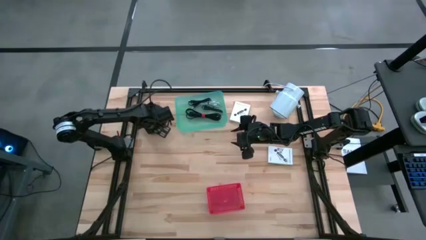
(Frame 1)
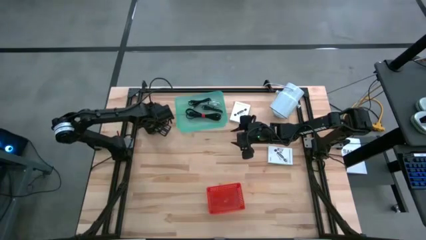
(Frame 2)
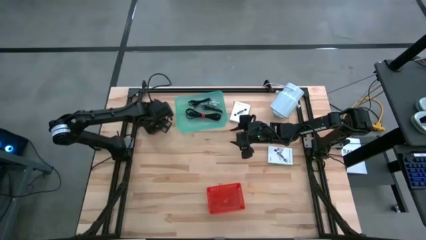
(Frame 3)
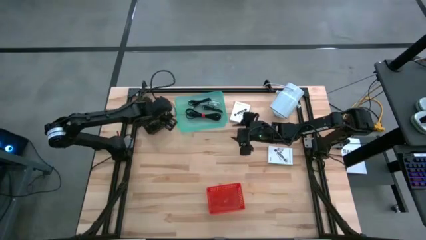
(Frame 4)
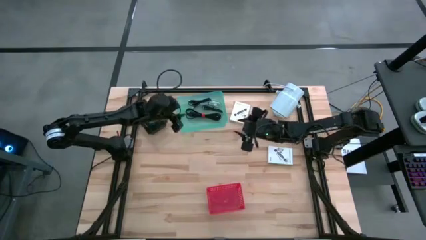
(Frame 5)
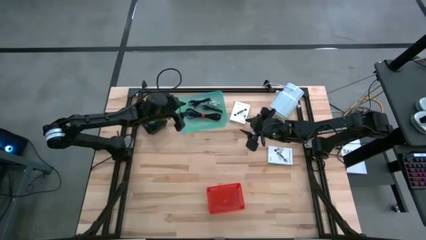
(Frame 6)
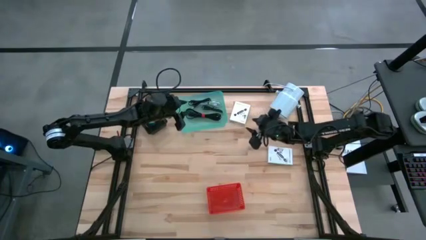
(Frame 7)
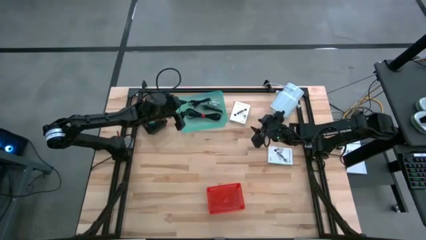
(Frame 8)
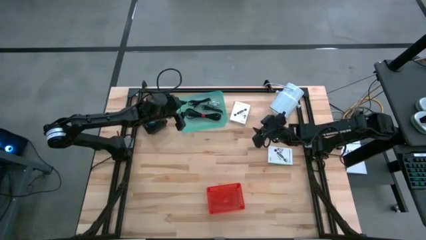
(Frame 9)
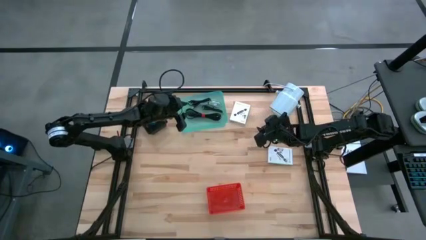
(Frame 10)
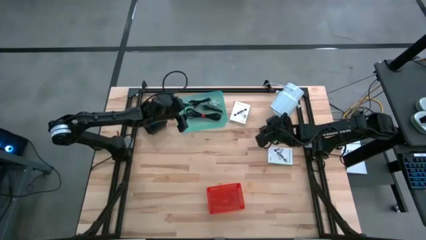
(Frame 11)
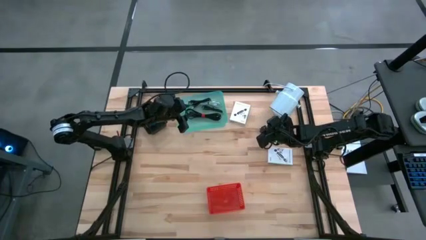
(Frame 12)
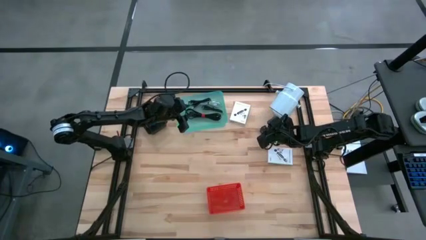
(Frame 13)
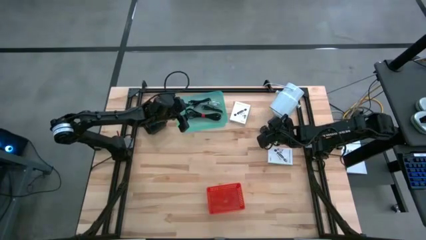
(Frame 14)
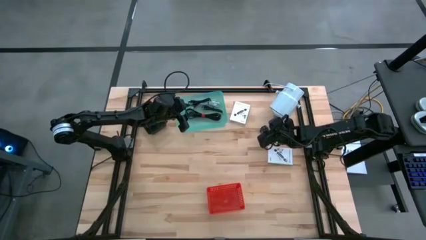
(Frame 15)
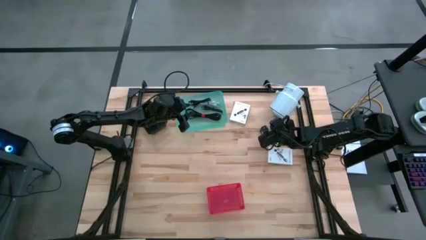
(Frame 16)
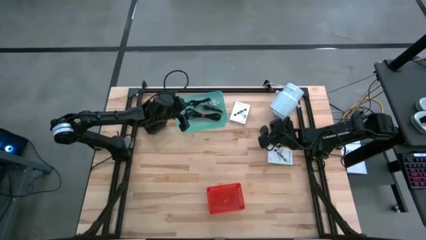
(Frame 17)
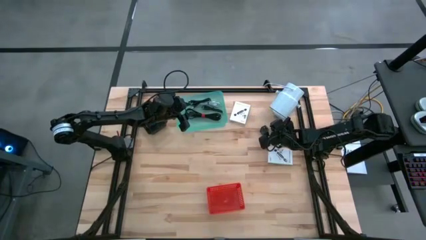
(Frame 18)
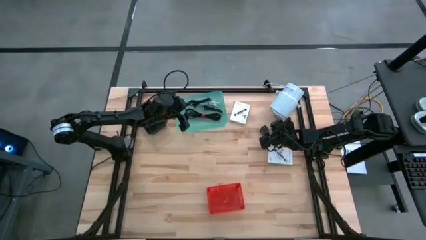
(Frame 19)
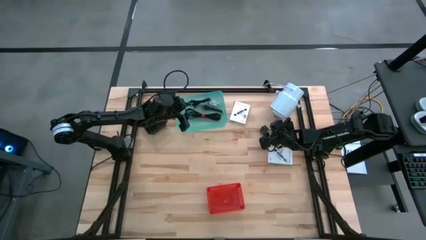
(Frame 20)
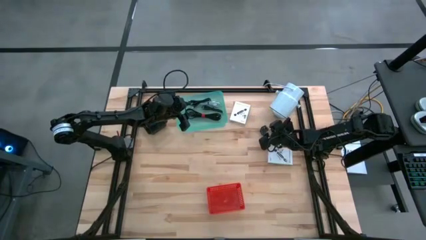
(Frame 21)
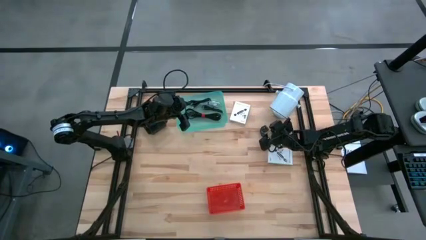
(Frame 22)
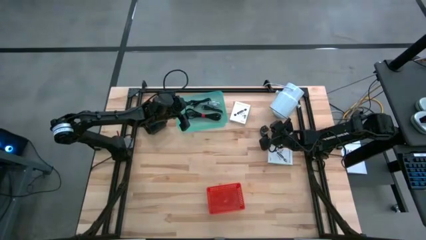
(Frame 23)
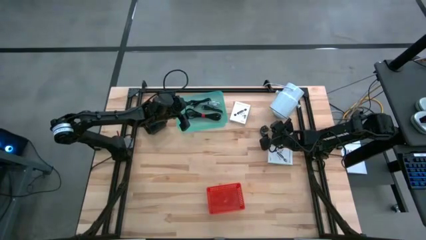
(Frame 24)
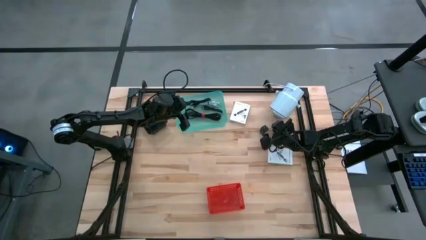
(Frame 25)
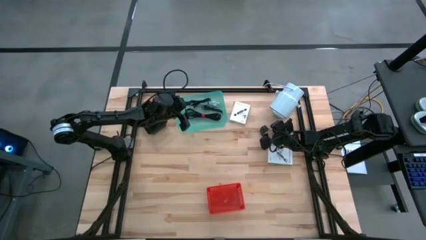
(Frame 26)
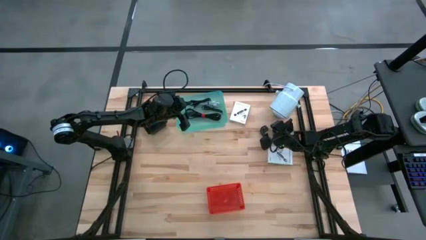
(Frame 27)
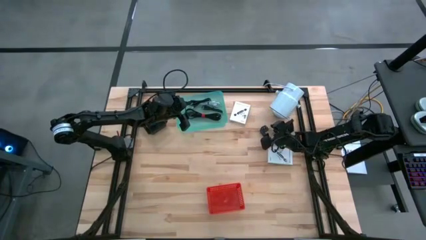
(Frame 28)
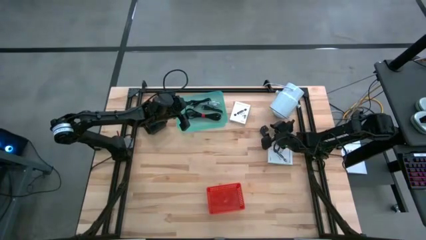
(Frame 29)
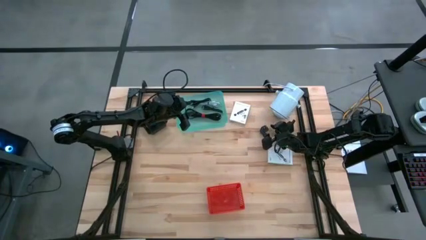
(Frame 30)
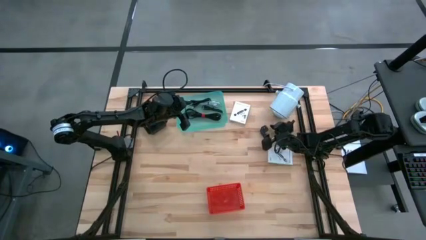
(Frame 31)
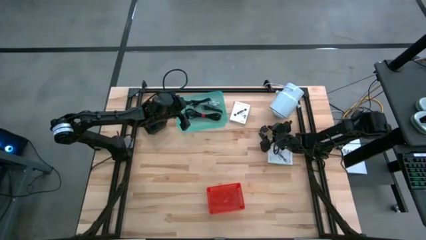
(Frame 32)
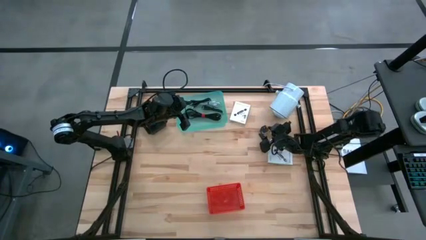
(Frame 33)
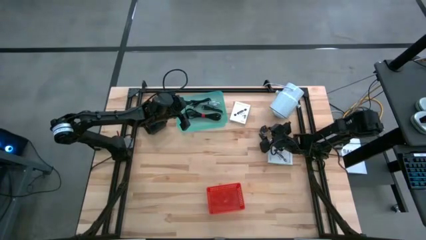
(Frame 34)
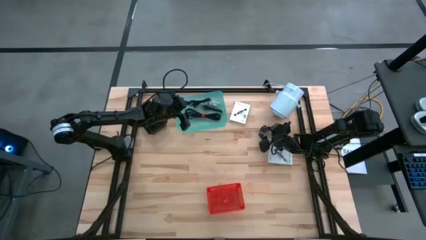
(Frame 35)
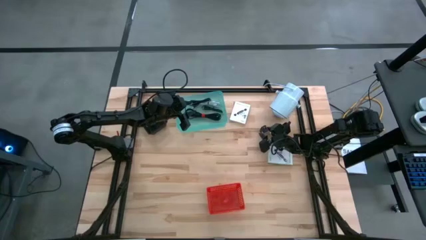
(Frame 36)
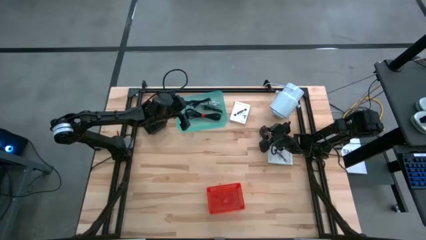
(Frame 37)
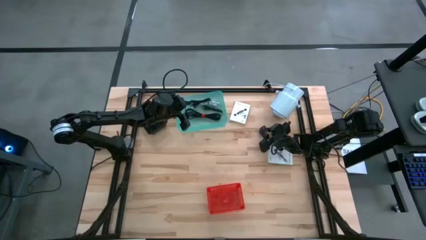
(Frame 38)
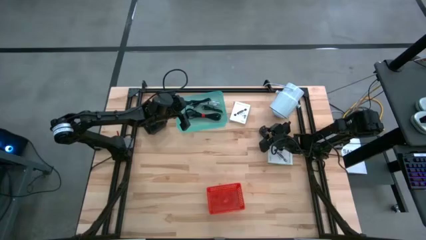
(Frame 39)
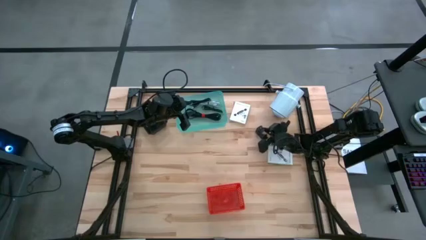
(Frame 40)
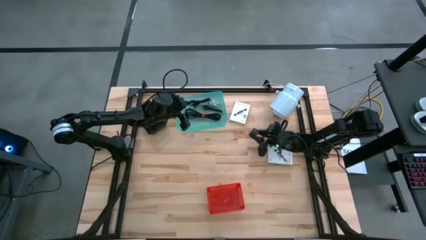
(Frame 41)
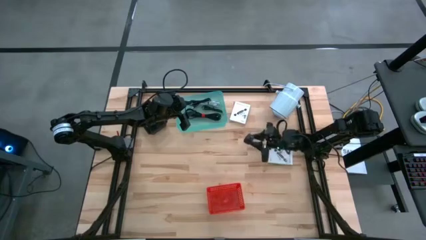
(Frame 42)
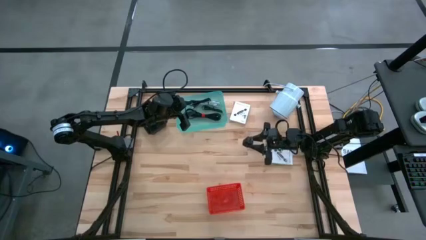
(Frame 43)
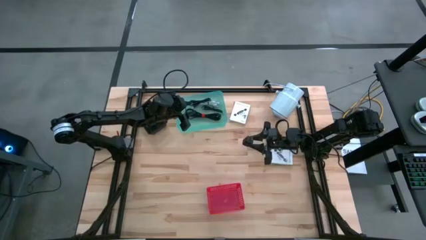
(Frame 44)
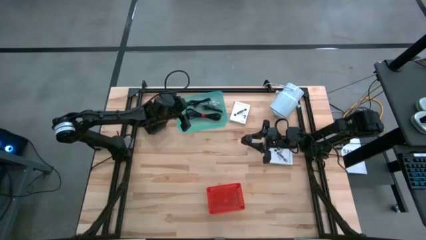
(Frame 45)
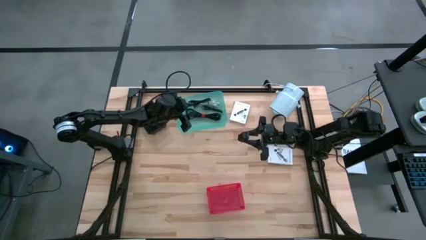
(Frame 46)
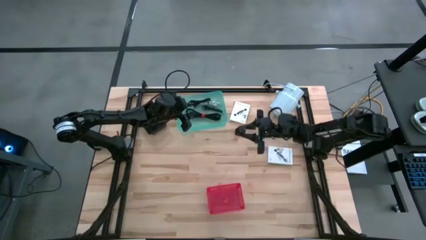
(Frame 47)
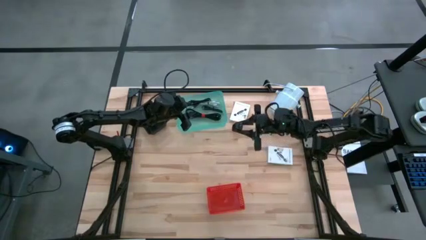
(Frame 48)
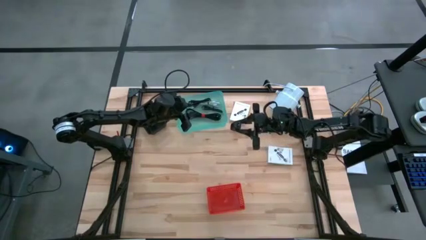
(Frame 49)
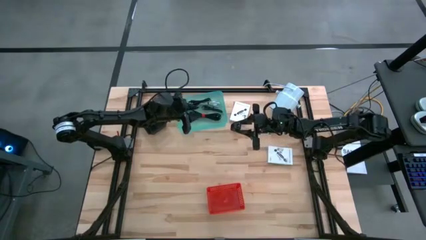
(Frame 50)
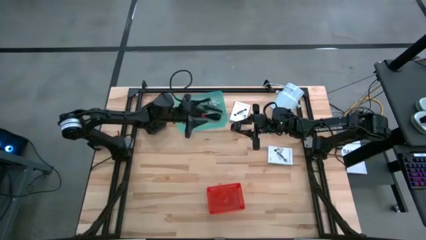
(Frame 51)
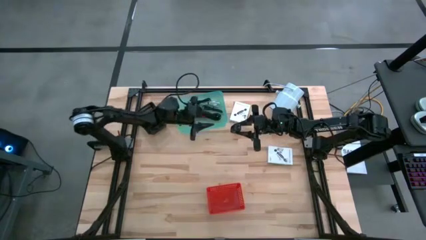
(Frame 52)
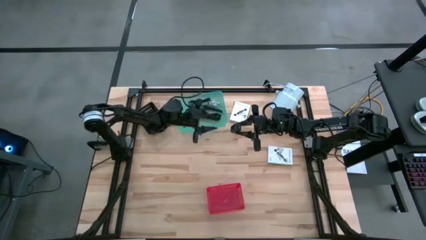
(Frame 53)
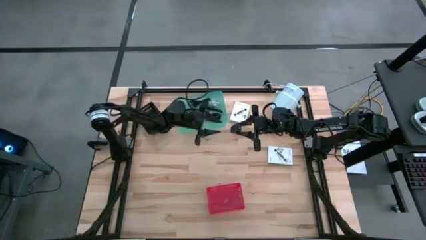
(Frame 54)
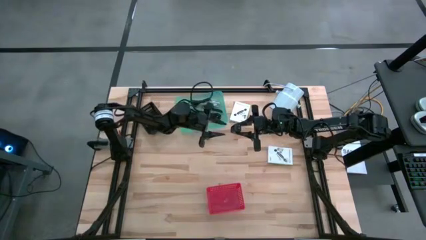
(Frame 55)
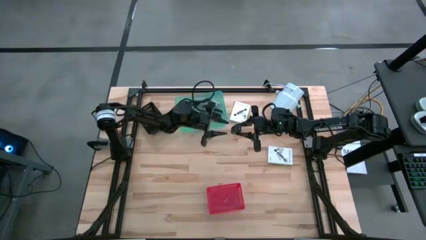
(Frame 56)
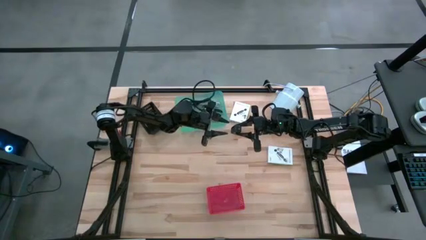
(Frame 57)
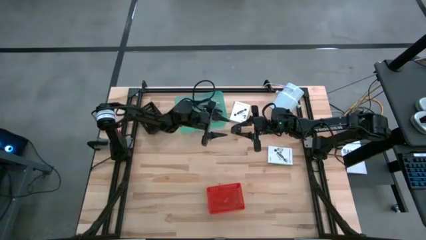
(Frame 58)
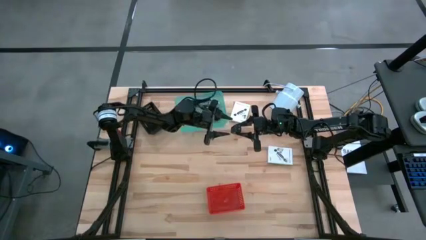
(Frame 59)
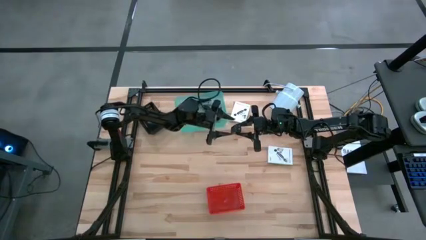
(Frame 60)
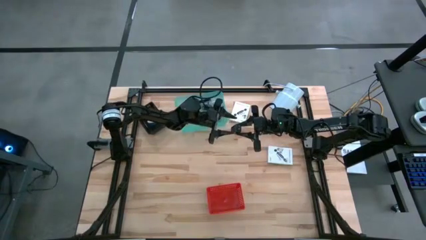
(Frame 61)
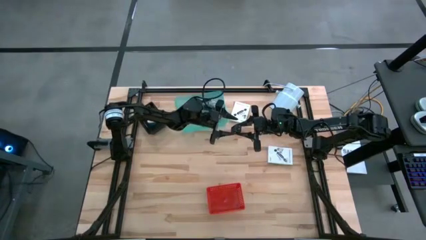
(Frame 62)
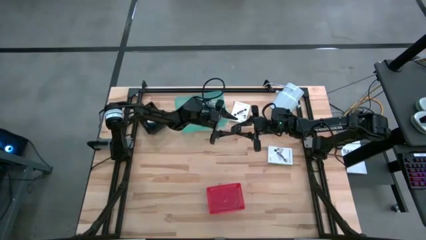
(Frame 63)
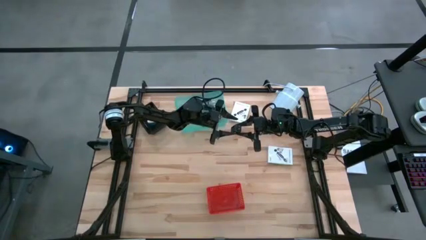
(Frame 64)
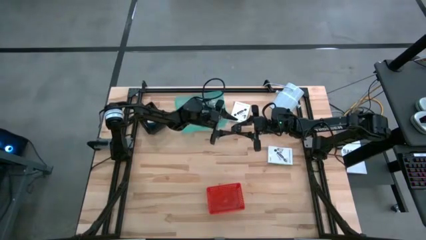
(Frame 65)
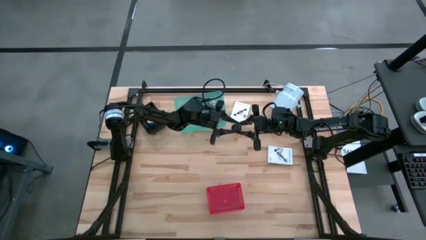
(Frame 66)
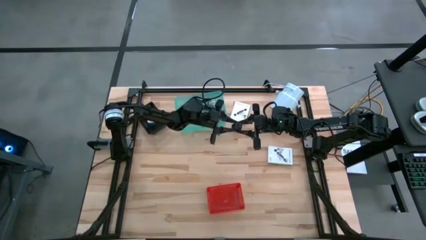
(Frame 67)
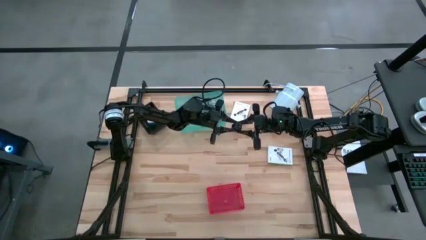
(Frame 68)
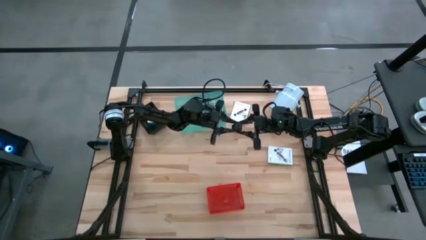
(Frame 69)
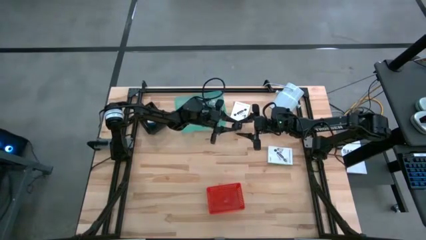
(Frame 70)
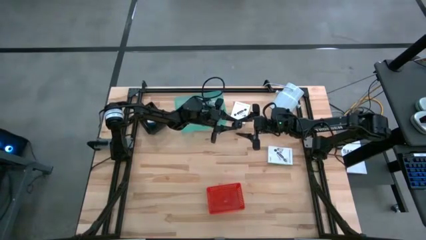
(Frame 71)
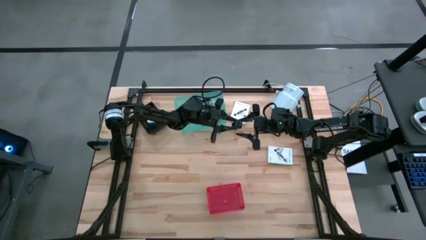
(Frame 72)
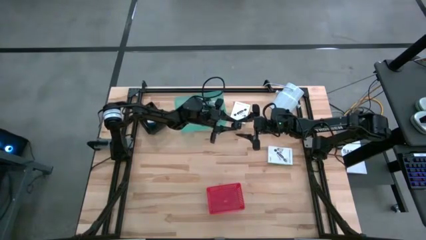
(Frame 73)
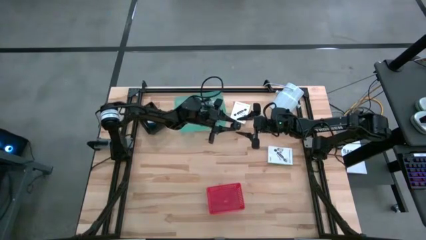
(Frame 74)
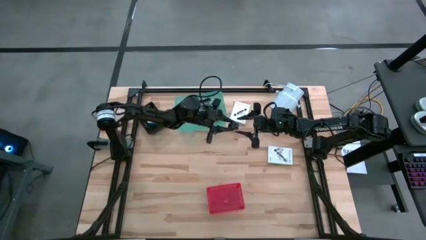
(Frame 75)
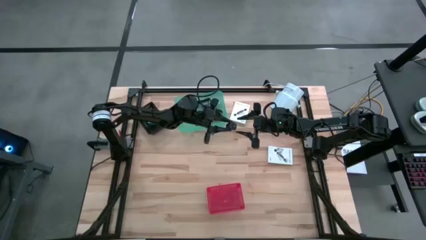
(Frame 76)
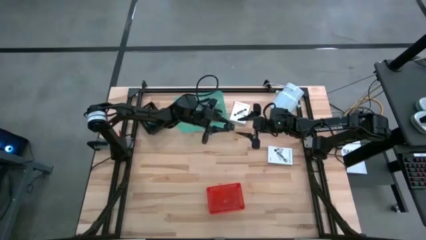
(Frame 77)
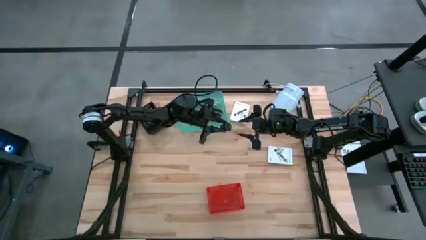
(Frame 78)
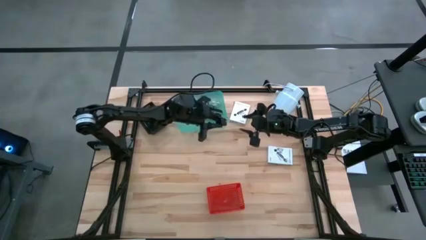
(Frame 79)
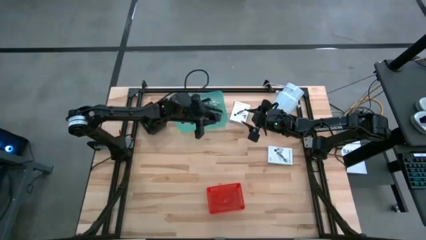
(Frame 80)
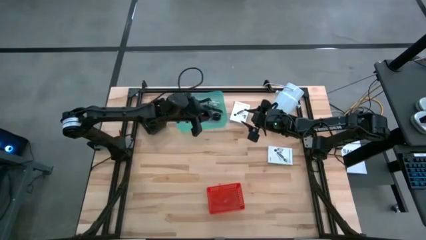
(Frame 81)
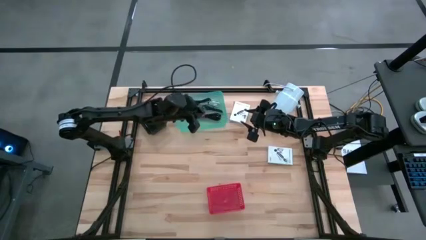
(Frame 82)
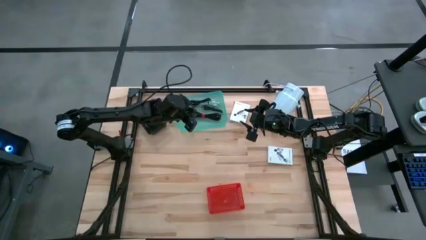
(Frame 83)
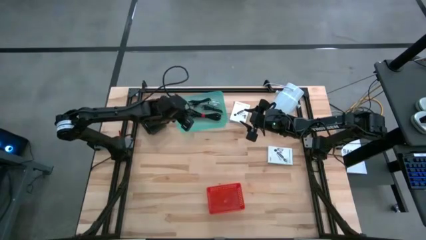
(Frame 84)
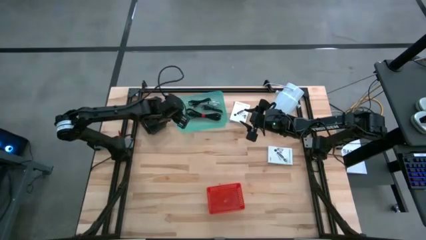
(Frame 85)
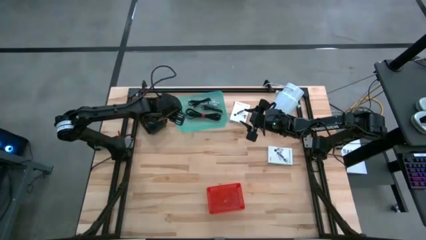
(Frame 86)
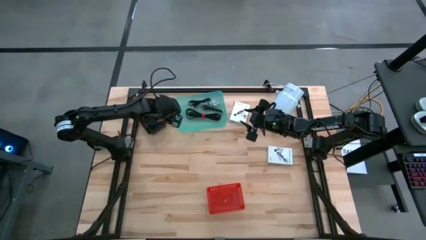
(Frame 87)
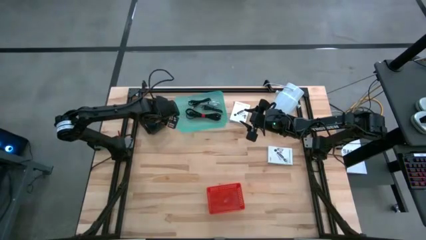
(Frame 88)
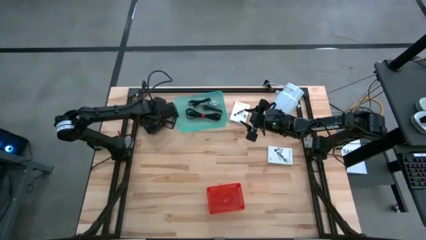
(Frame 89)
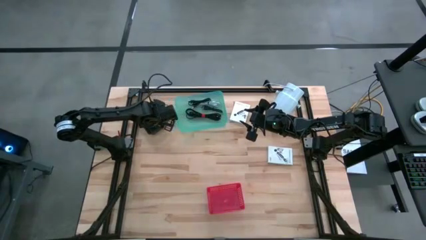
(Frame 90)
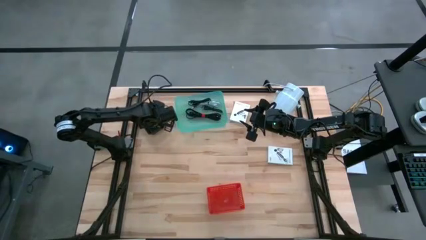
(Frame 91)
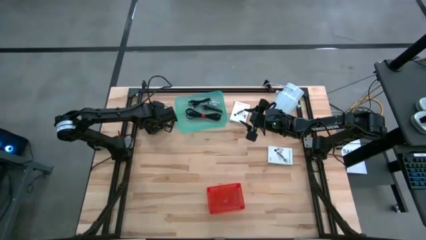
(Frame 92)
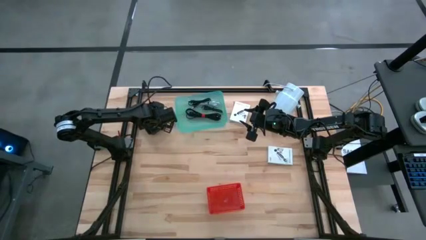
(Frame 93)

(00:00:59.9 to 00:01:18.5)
Task: Pick and place items into bin
Put the black charger adapter into the black bin
